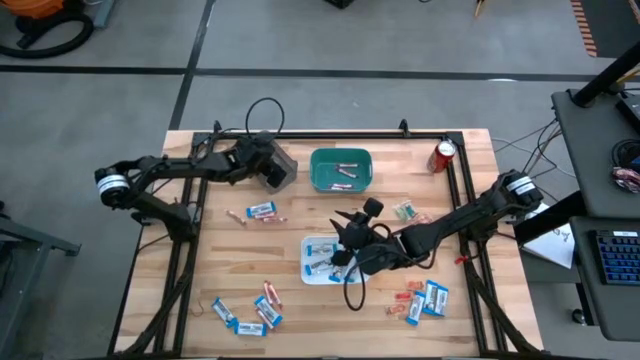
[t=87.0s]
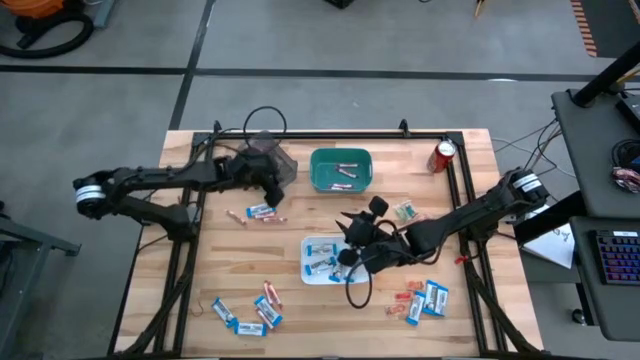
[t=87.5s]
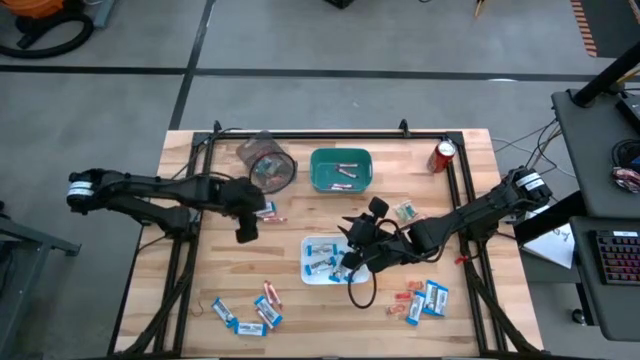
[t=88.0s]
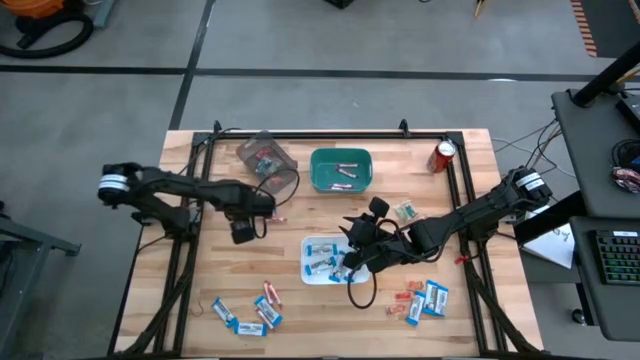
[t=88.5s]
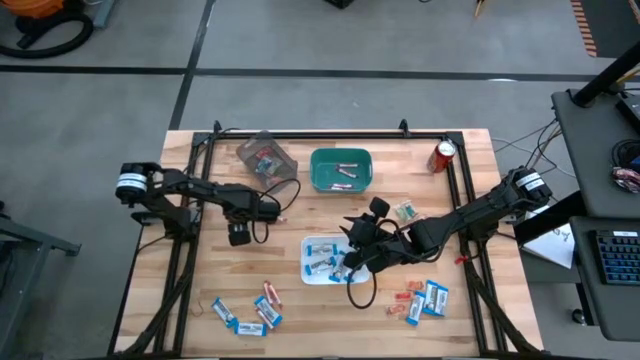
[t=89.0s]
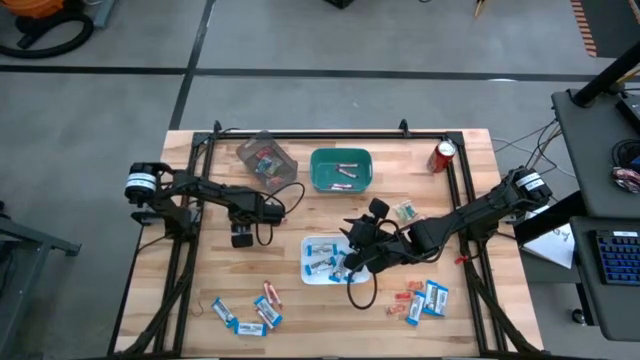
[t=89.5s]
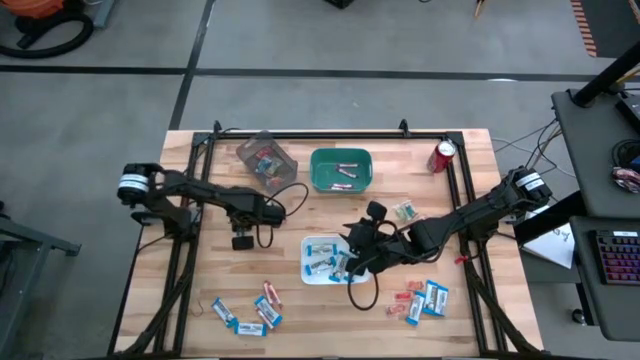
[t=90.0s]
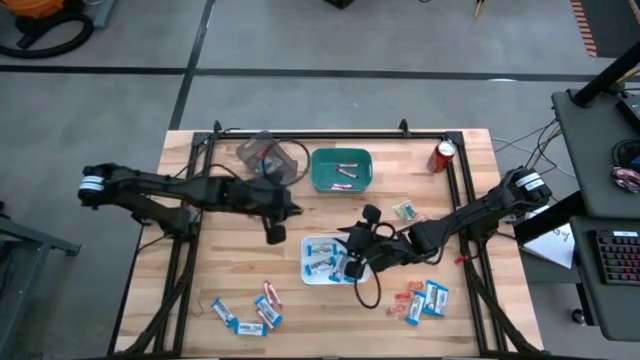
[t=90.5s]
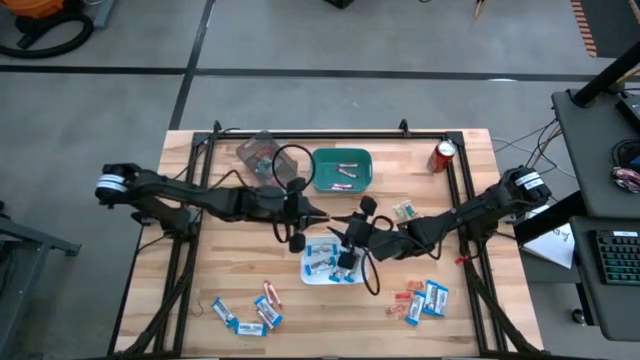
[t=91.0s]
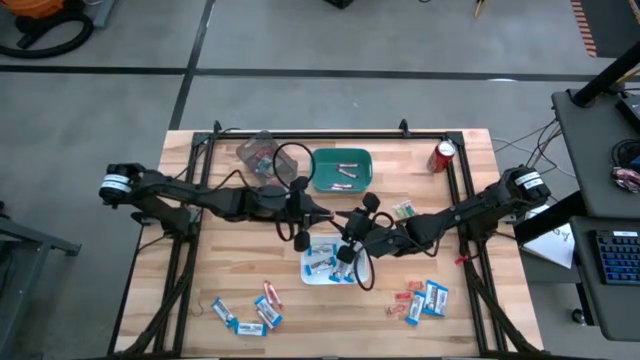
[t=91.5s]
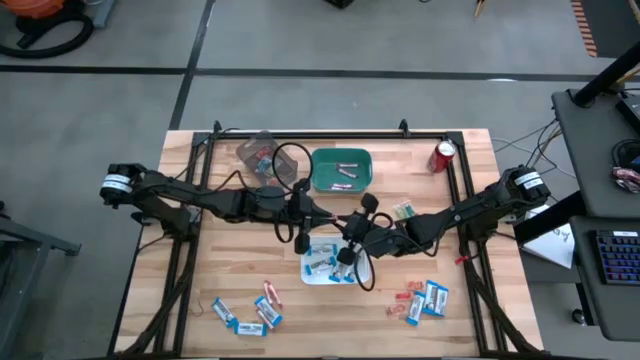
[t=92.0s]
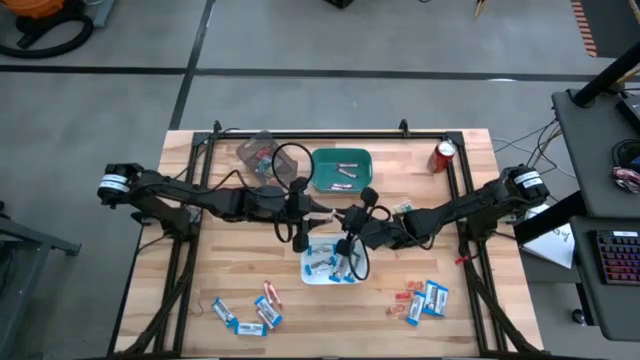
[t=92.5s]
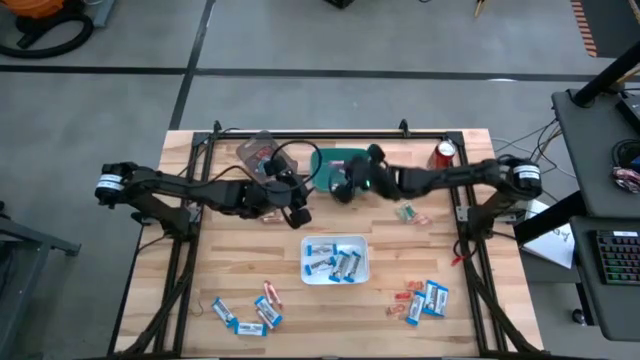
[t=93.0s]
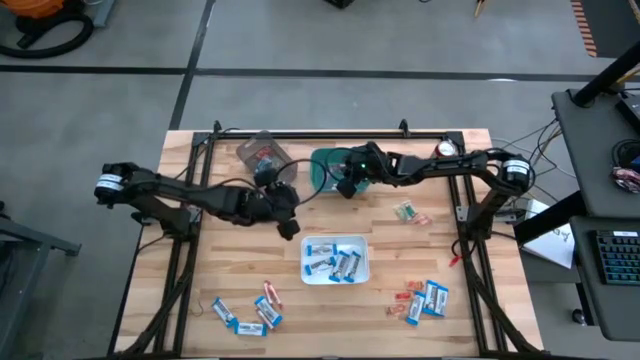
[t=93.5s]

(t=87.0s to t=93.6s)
Task: Sort candy
Put the white candy into the green bin

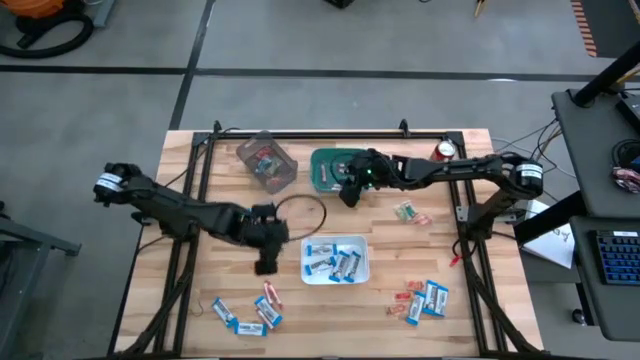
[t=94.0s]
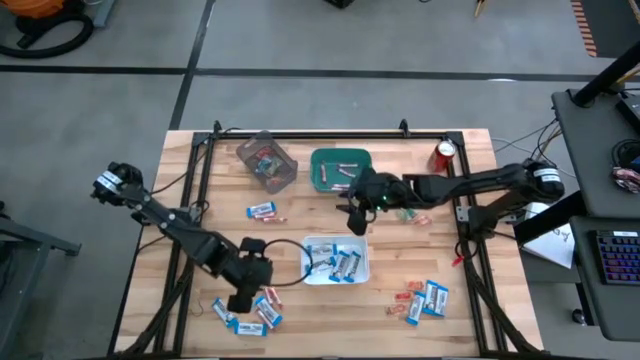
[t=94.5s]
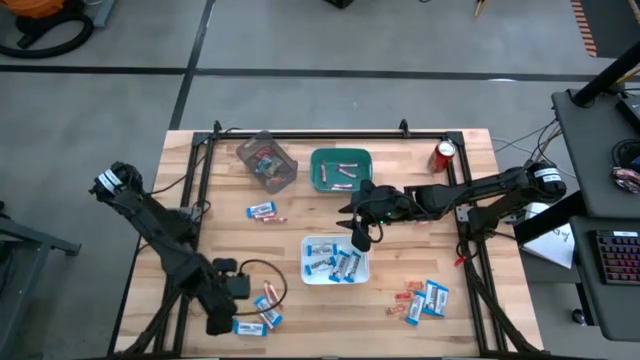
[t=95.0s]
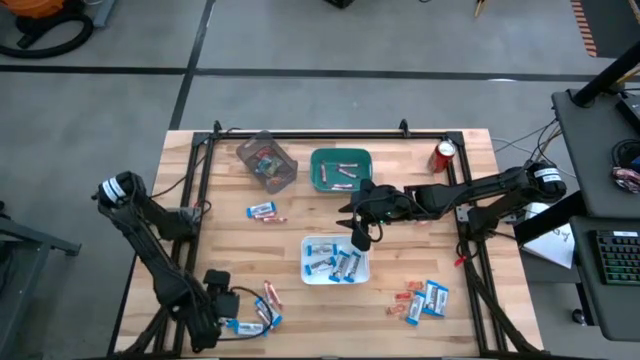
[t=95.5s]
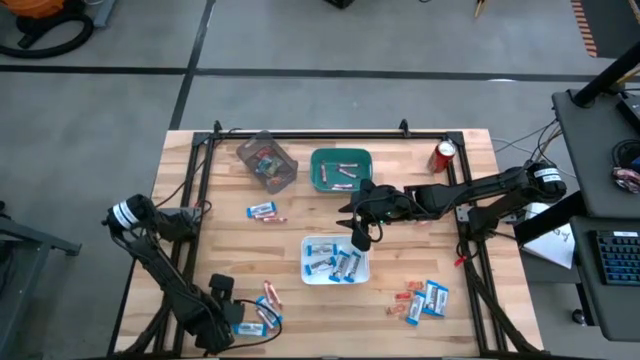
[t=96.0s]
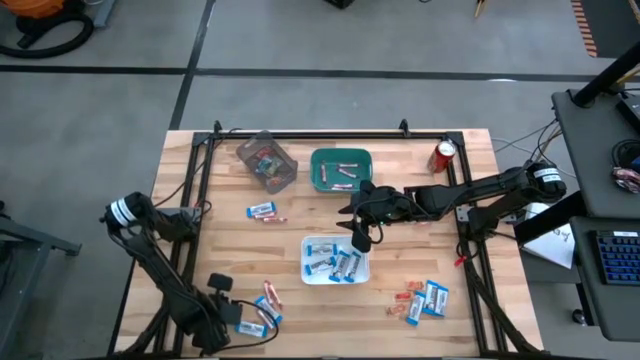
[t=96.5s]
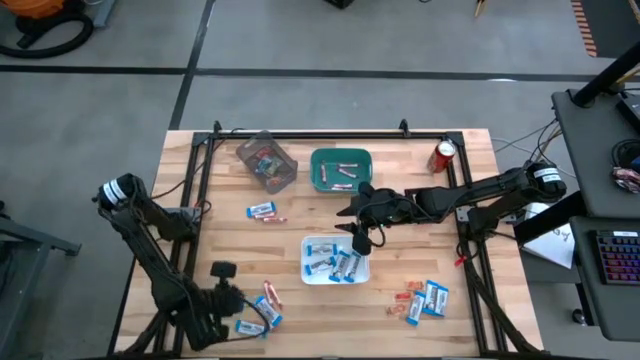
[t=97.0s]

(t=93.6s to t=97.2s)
Put the white chocolate bar into the white bin

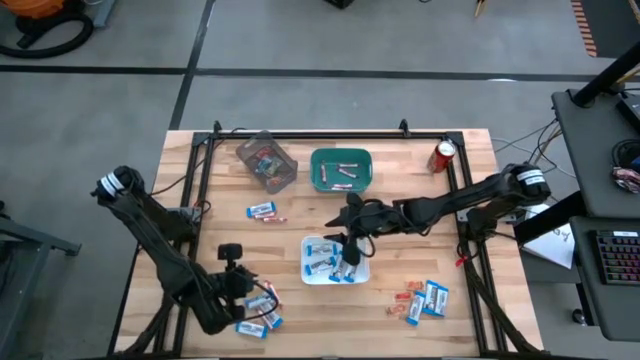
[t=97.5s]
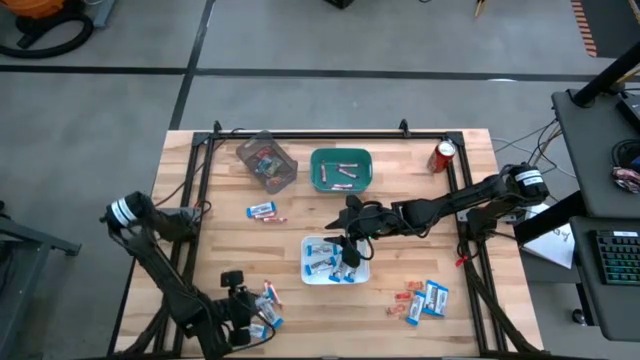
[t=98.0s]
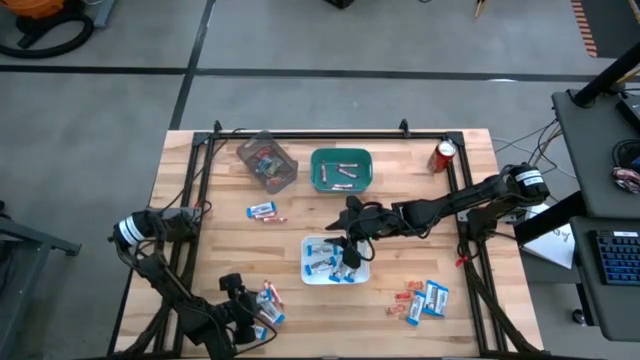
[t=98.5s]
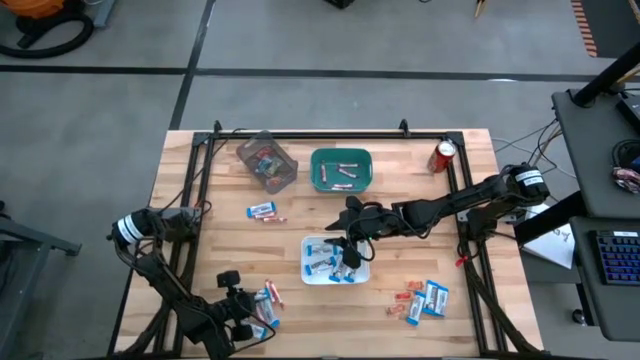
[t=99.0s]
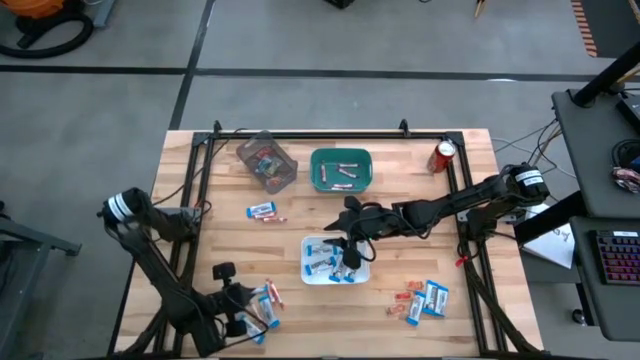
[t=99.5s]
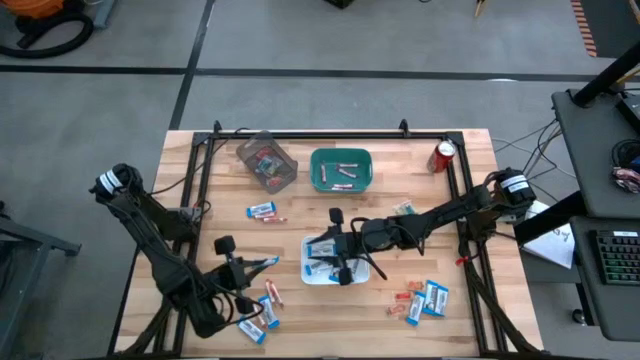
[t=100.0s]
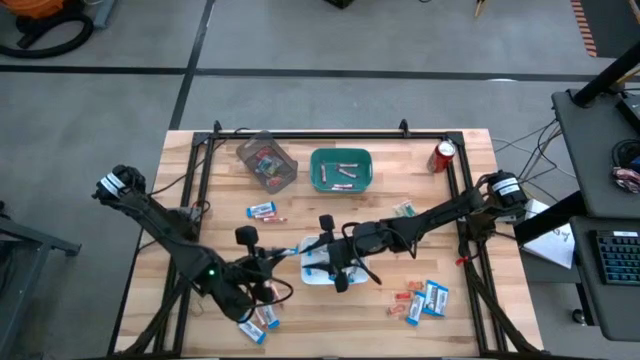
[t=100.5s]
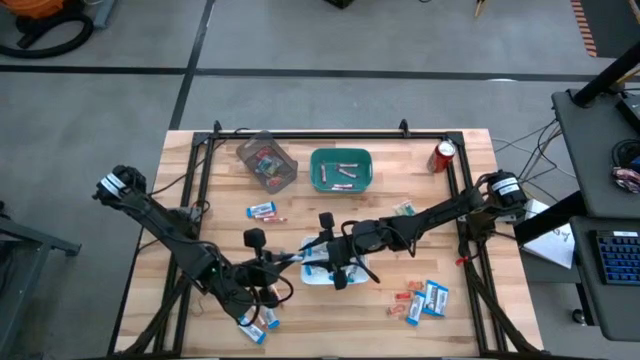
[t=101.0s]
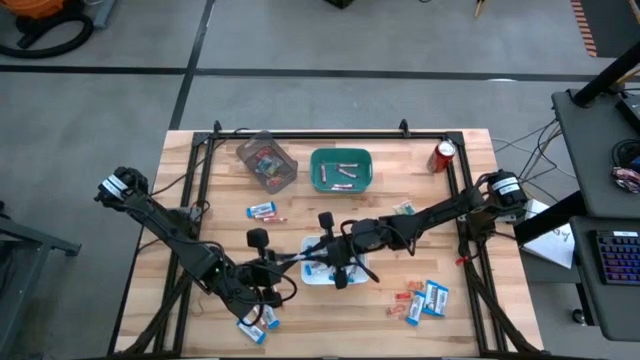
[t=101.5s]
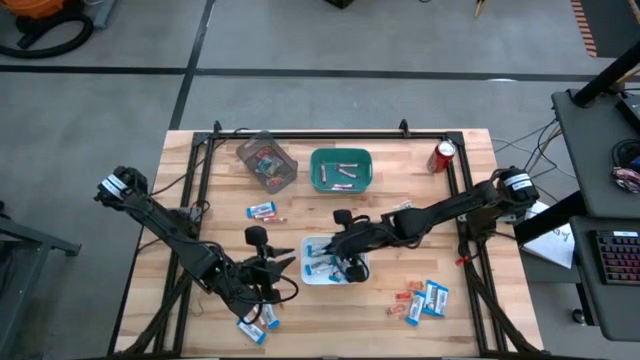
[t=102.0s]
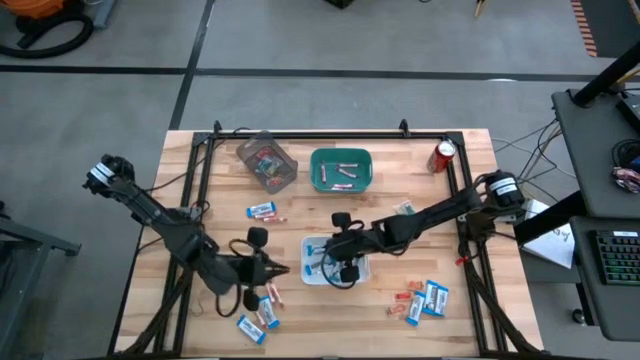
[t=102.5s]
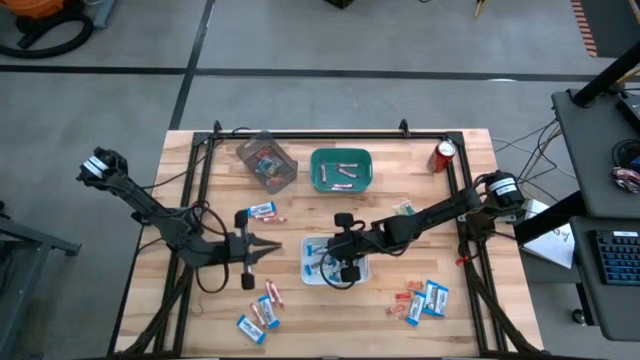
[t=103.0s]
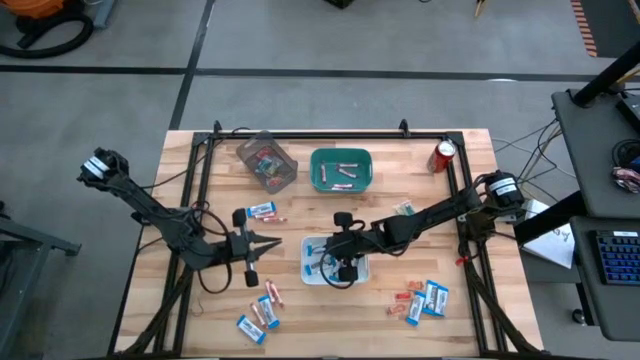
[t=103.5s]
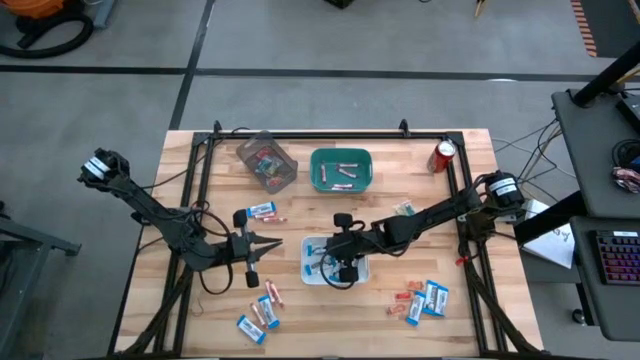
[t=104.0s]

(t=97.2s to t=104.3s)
Put the white chocolate bar into the white bin

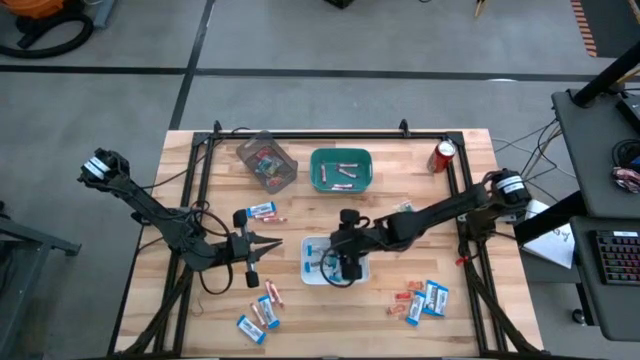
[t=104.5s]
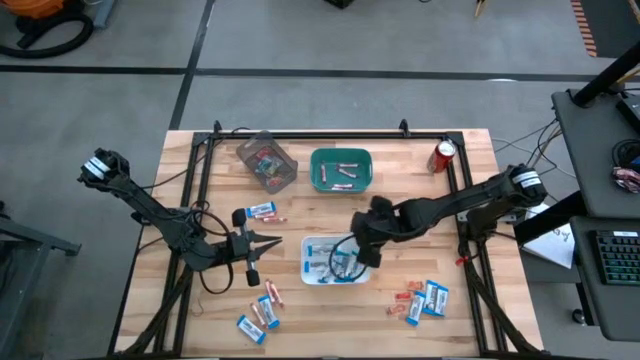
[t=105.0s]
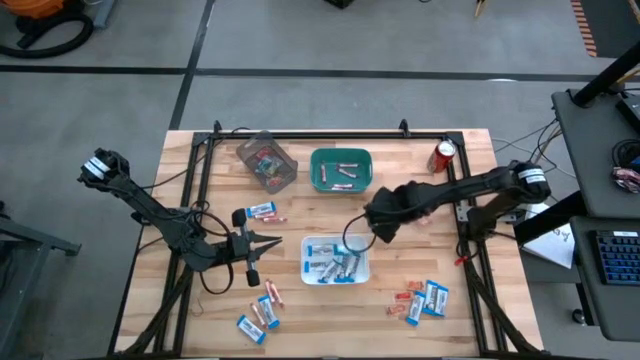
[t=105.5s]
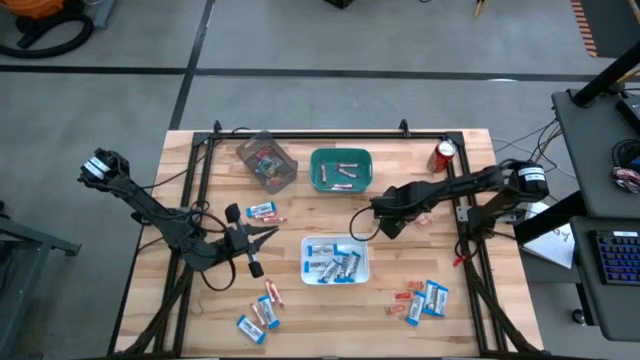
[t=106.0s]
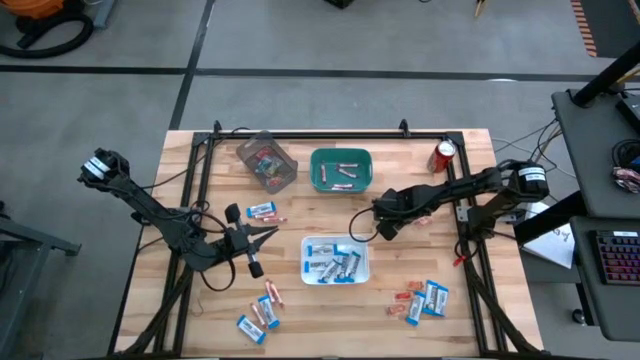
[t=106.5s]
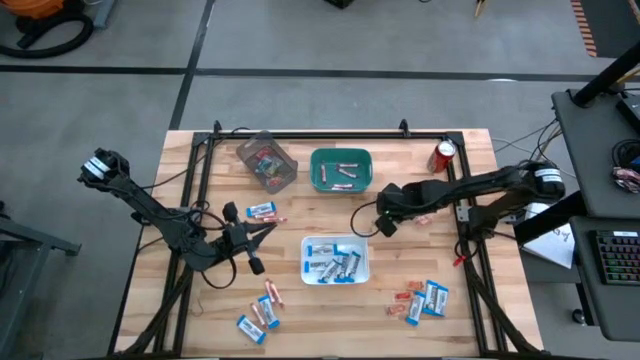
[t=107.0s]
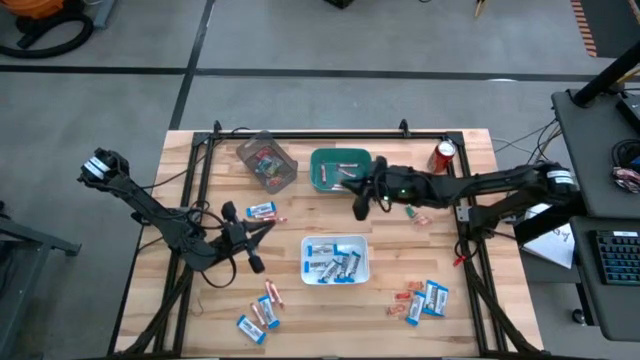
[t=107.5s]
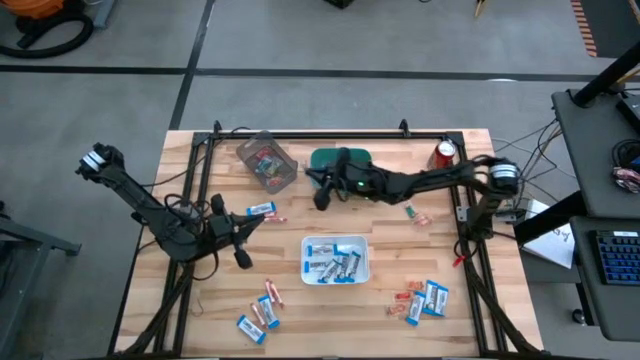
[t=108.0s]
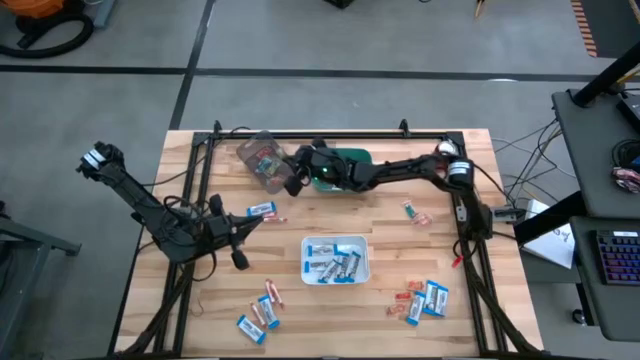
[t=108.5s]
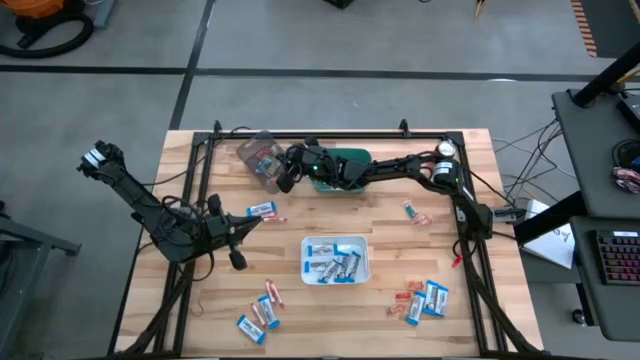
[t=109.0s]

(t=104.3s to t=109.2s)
Put the green gummy into the black bin
